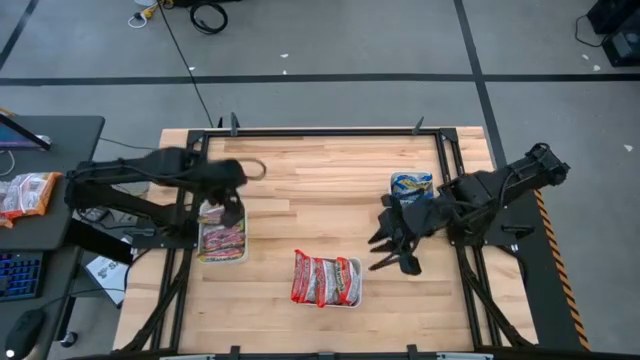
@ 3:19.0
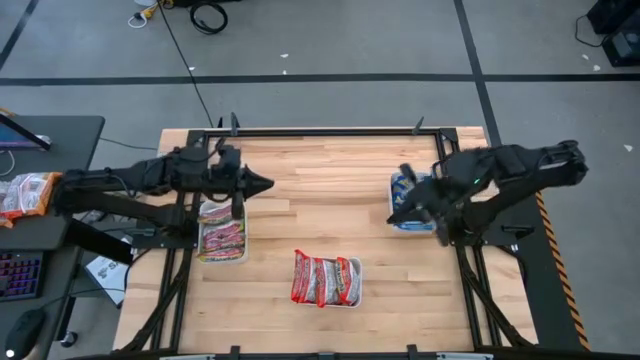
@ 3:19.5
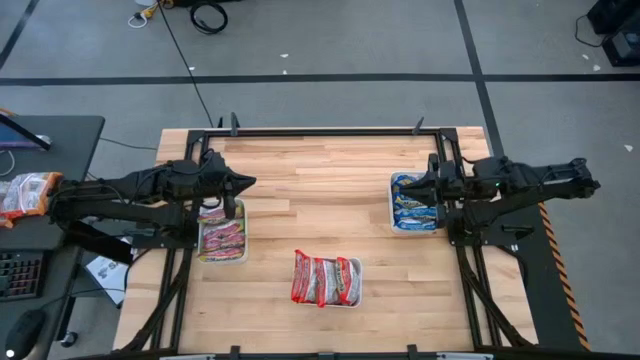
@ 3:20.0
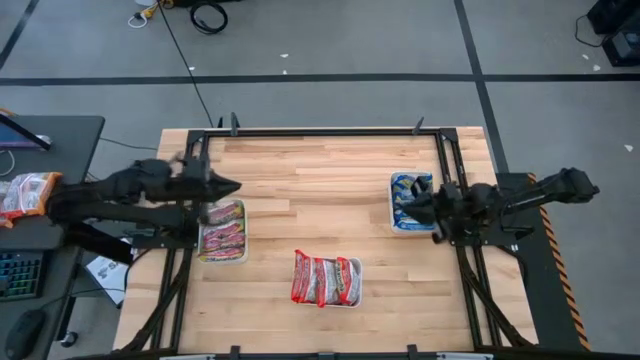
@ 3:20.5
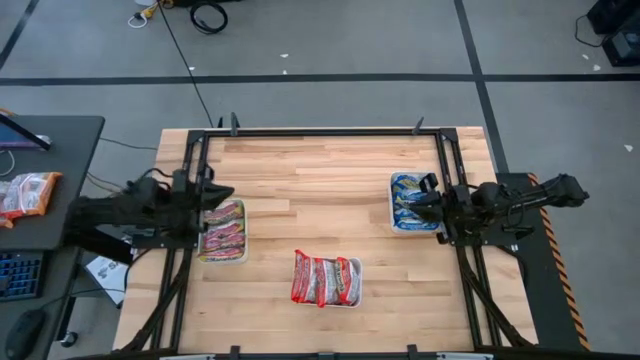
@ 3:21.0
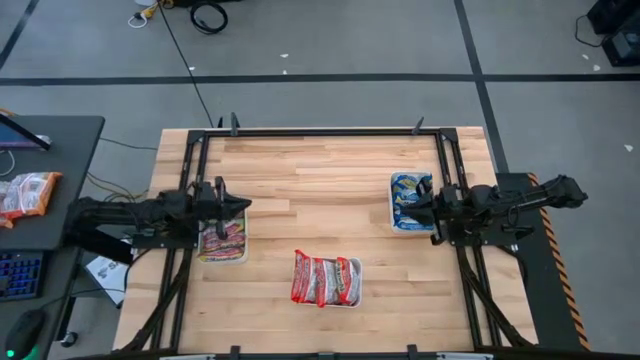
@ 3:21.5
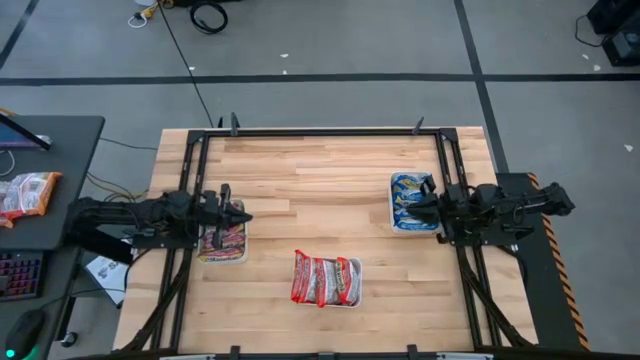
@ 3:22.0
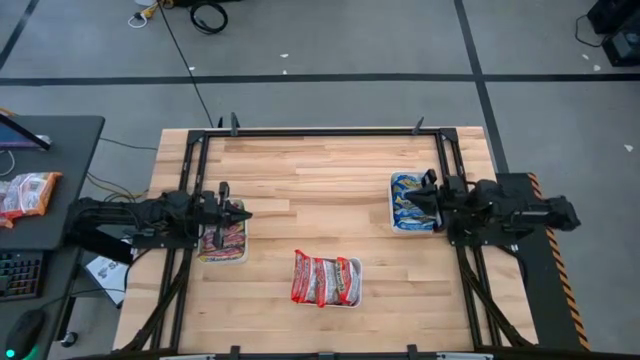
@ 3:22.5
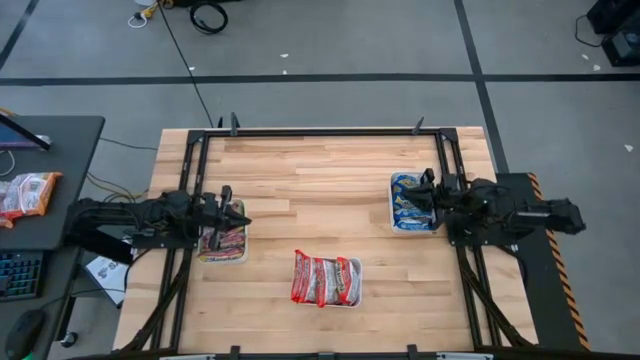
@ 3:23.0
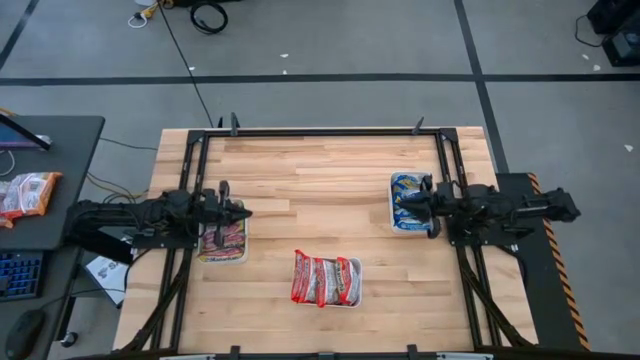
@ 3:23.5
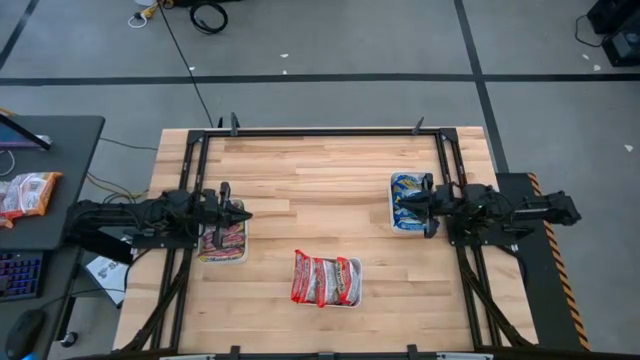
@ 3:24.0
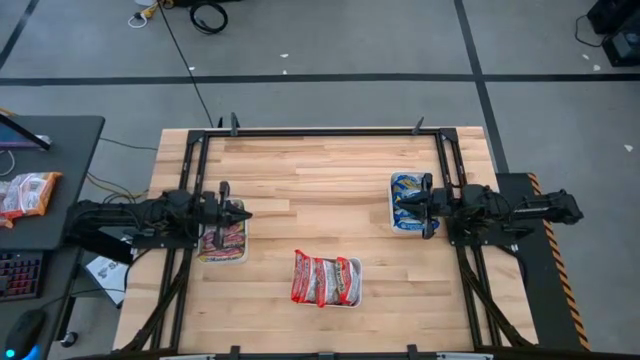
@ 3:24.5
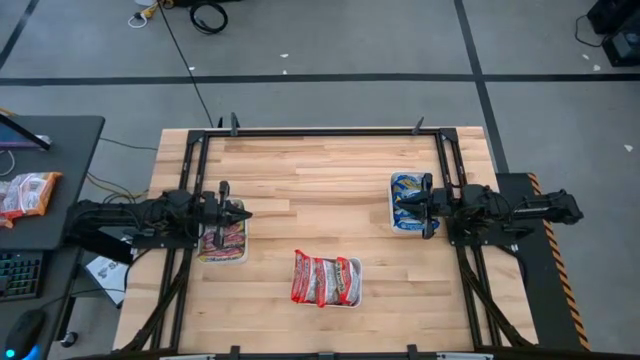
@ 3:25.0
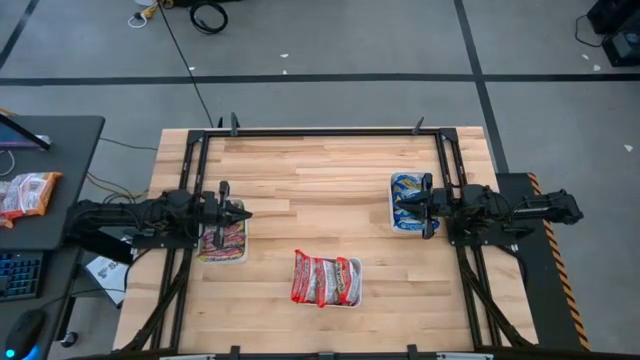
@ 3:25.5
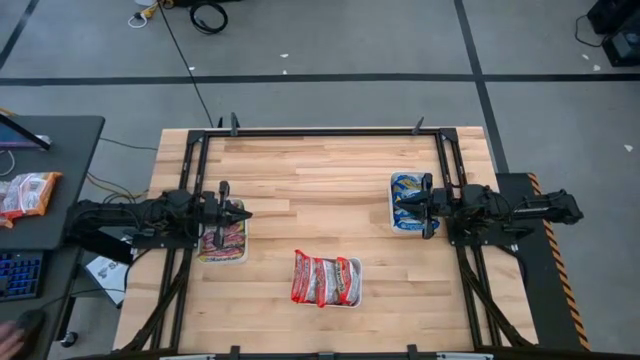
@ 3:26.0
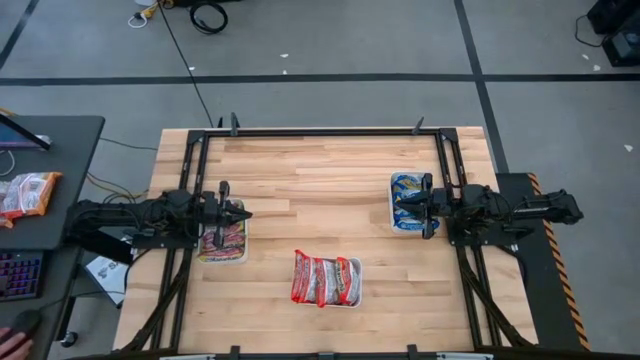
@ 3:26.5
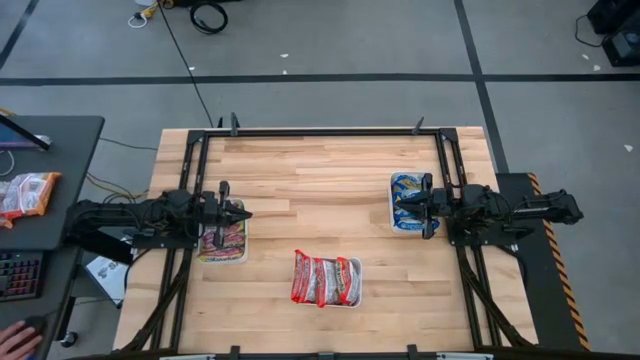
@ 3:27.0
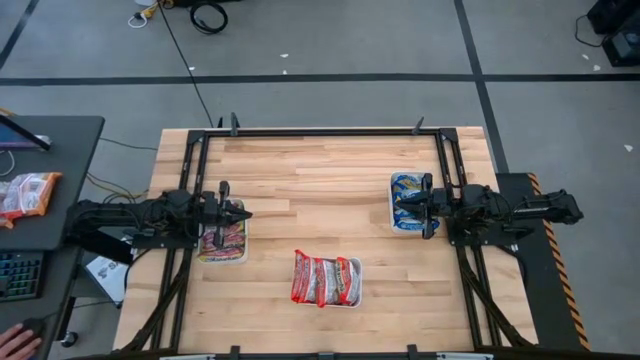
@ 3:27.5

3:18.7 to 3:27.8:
Task: Sort Maruchan noodles
Return to Home Position

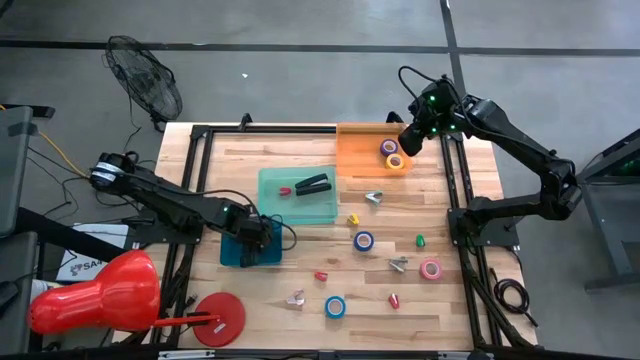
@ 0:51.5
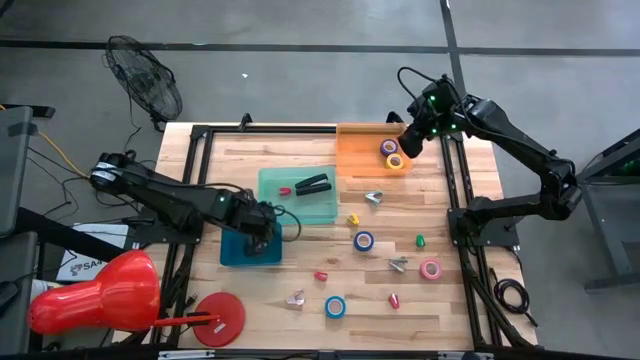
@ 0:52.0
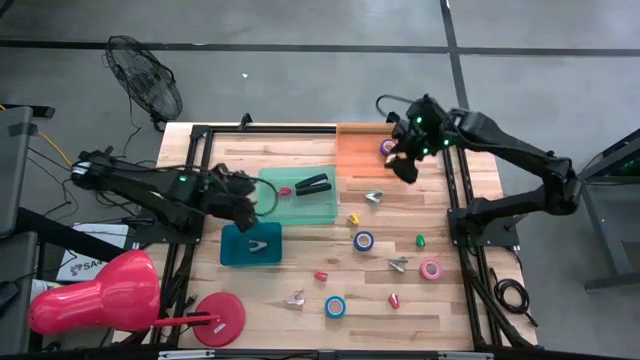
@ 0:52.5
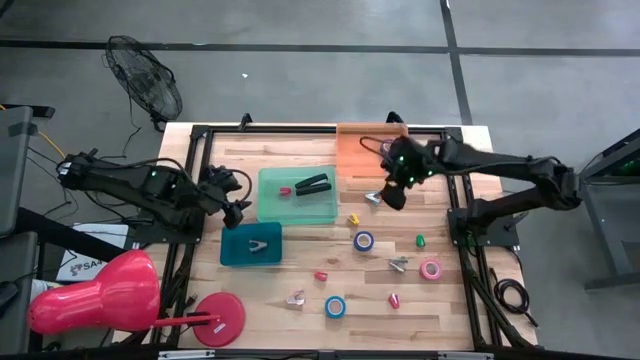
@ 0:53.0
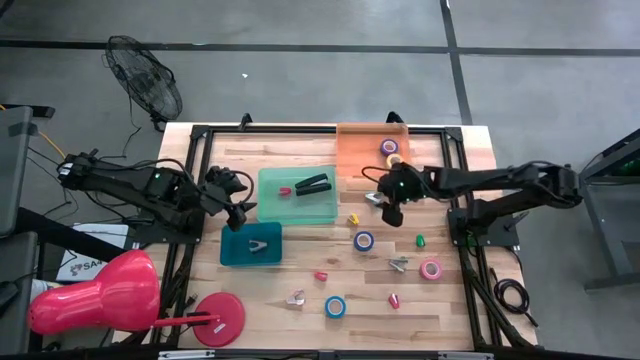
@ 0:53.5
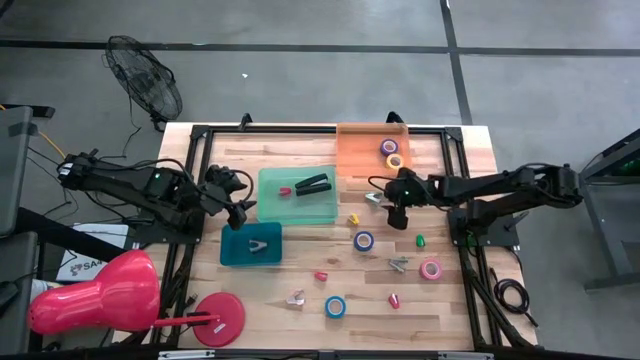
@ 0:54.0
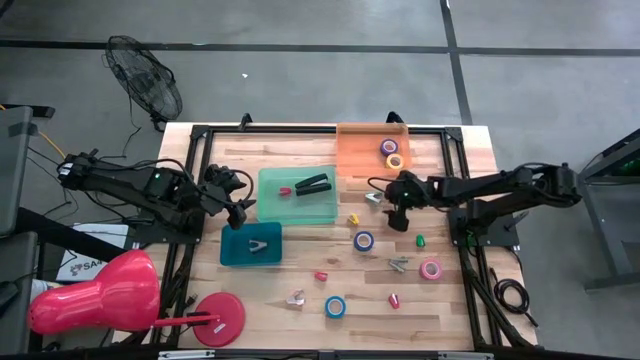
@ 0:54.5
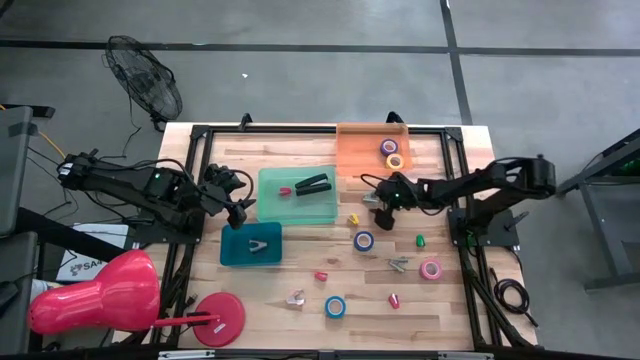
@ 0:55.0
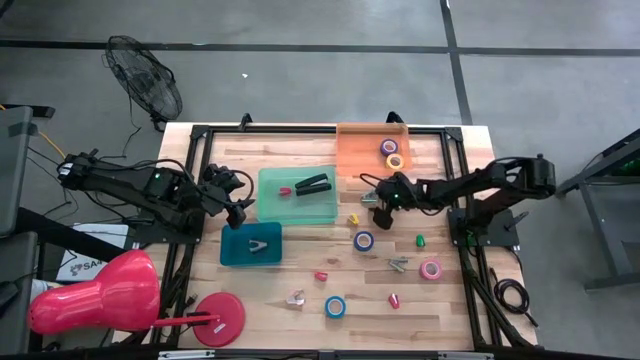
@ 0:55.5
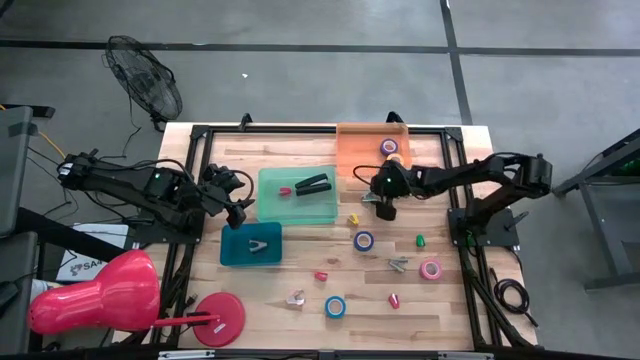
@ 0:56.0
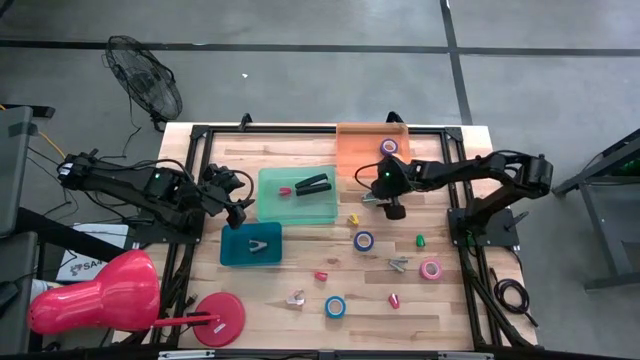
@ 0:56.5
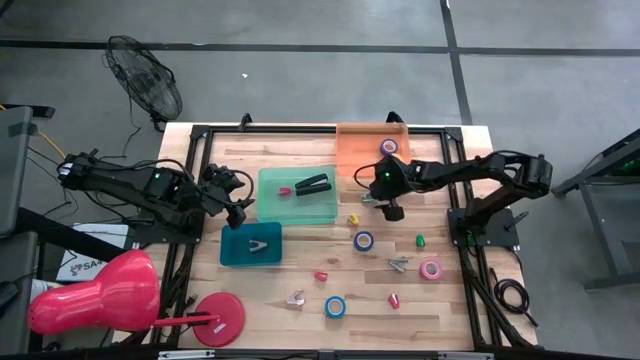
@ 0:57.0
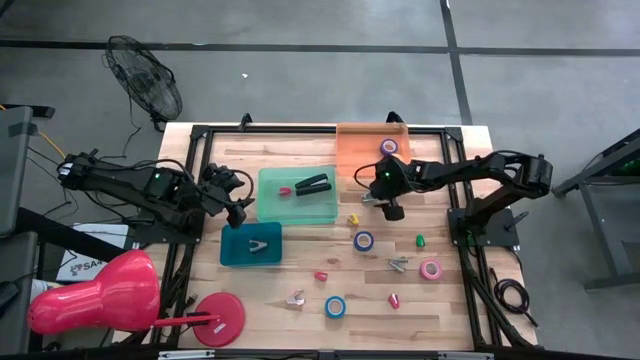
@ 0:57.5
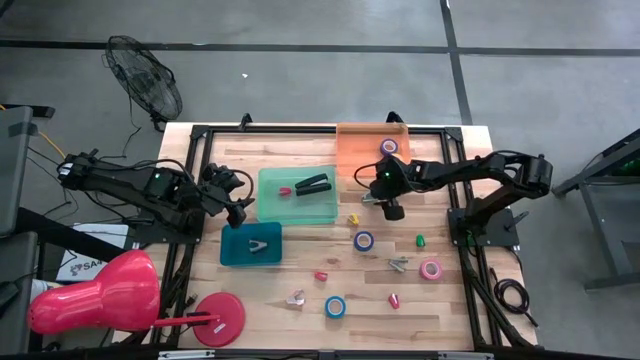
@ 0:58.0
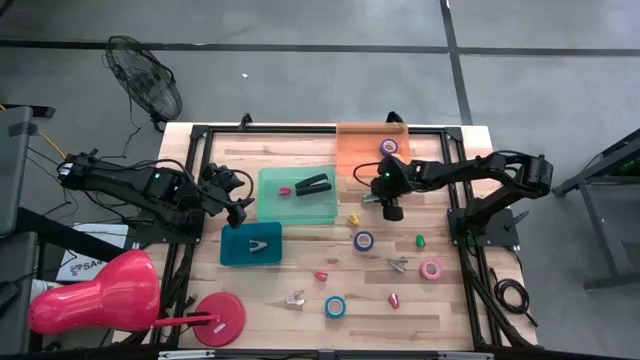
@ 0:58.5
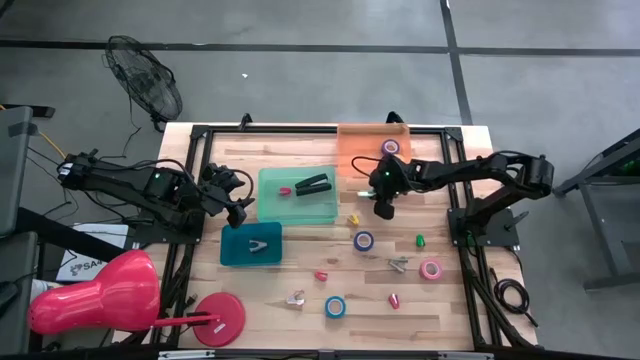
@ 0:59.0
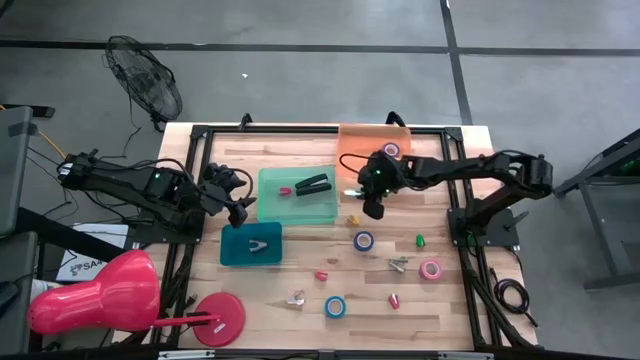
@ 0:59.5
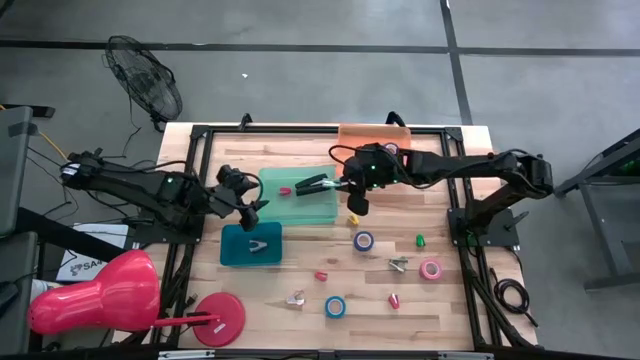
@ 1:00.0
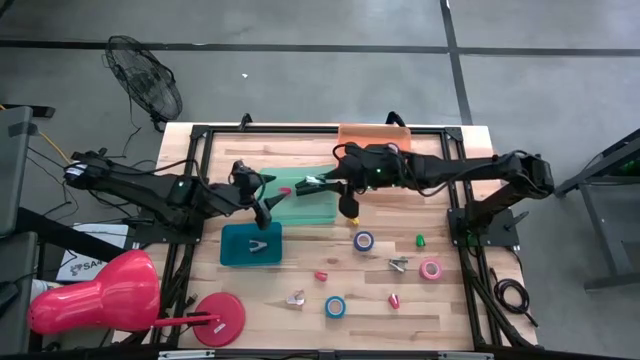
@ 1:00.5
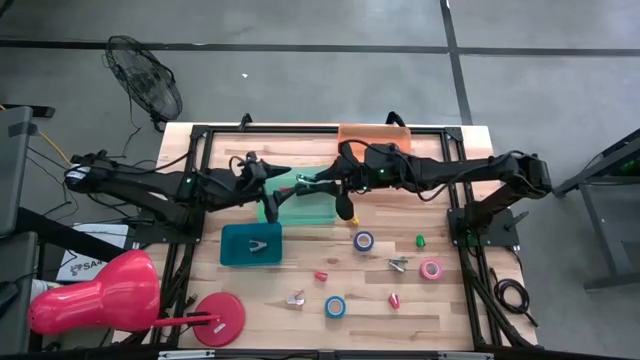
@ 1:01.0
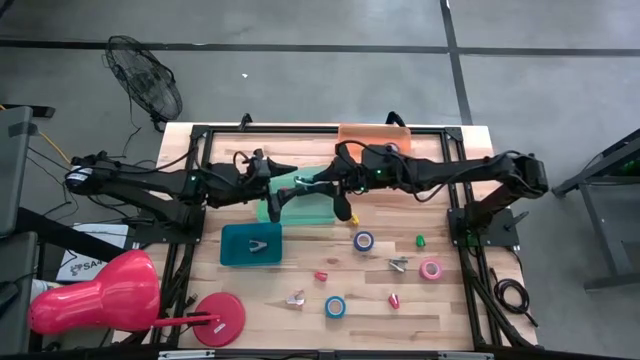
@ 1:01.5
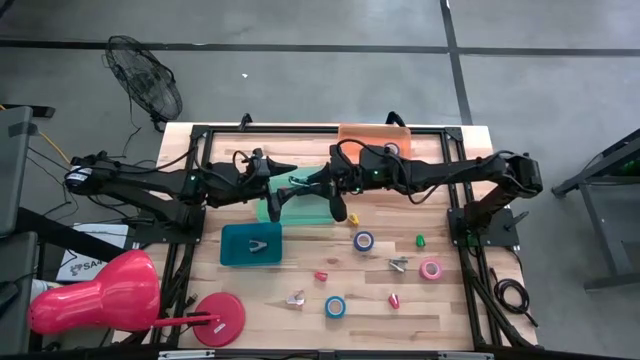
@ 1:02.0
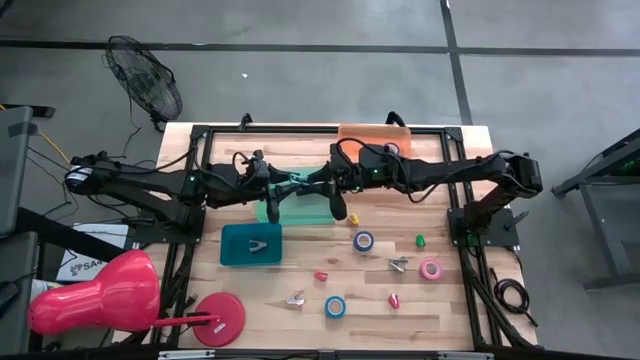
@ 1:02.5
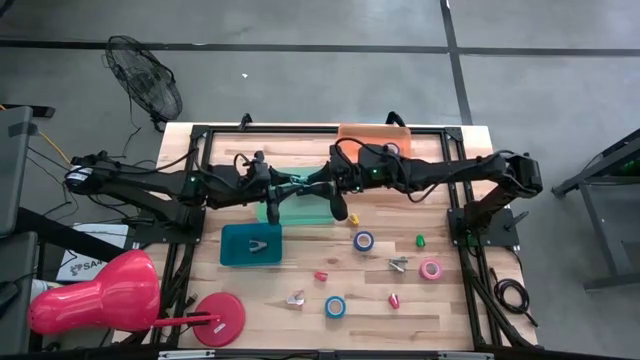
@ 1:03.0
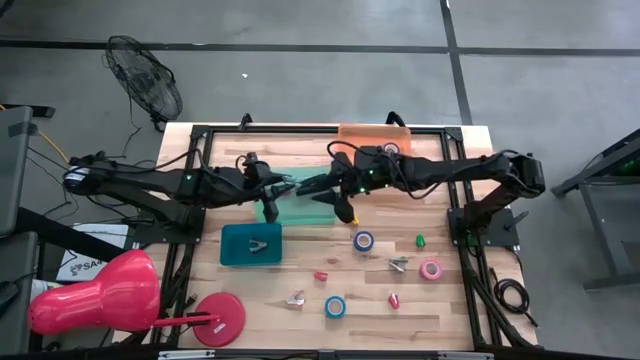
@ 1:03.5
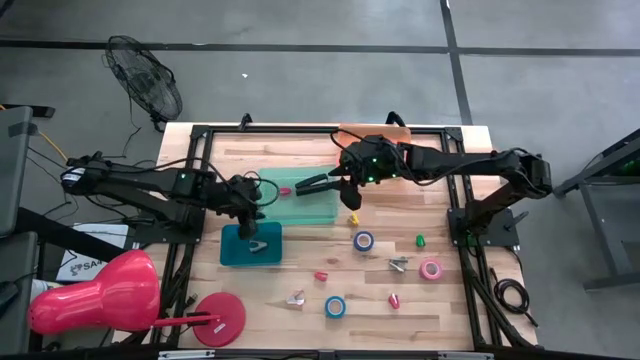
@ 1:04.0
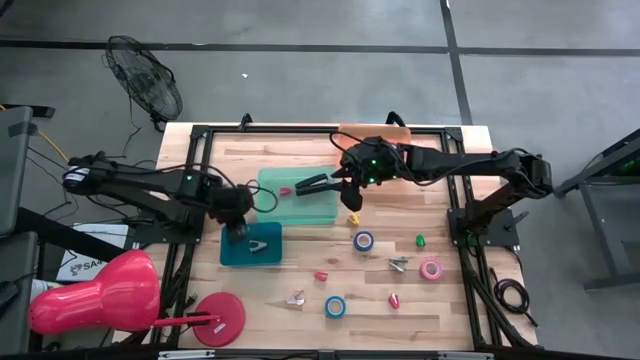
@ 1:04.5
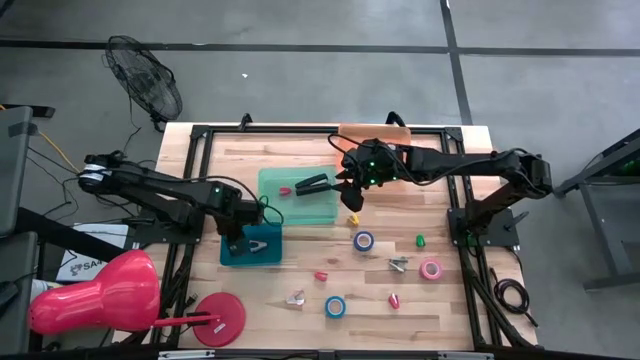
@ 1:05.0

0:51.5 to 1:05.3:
Task: Pick and place Stapler, Stapler remover, tape
Put the light blue staple remover in the blue bin
